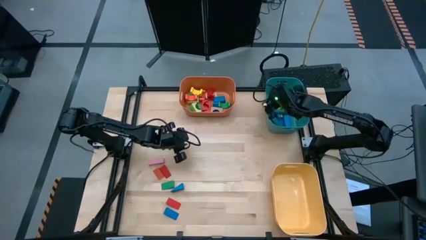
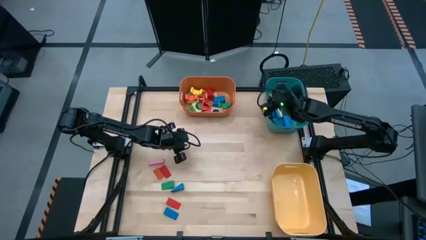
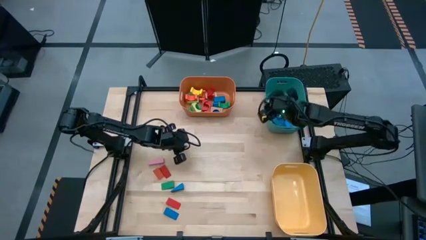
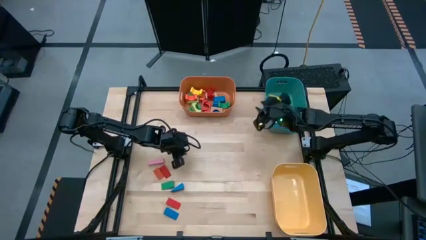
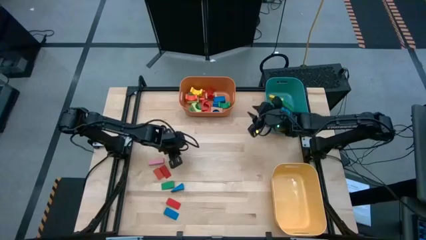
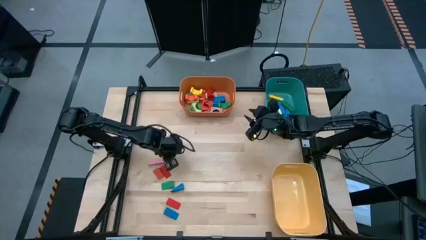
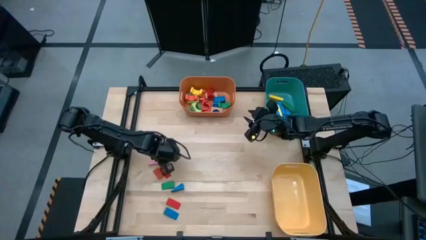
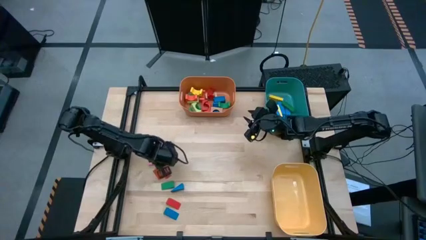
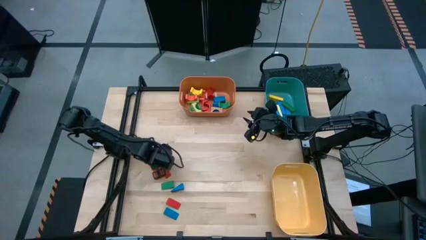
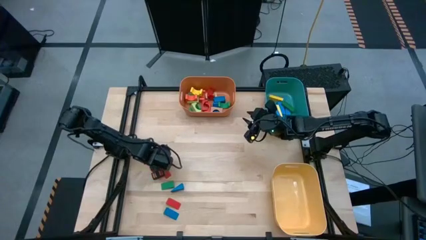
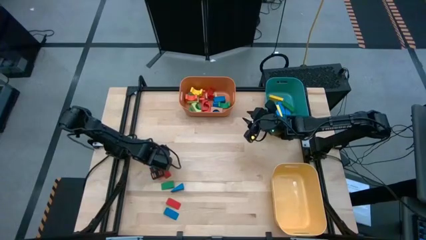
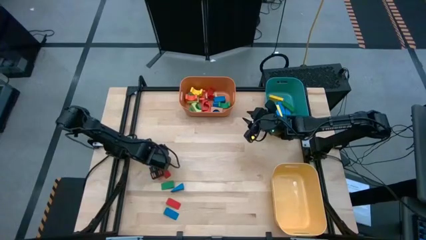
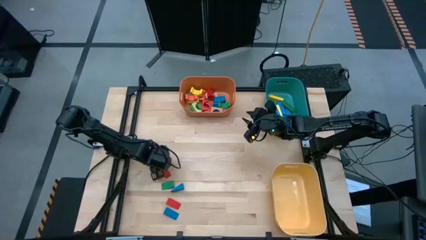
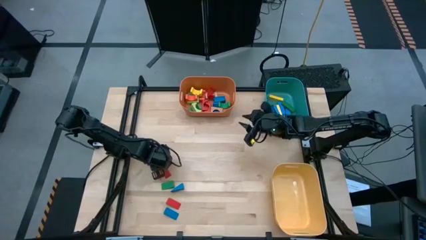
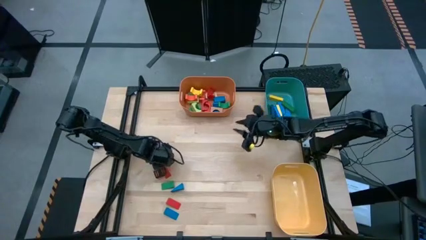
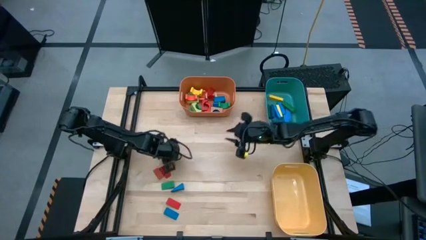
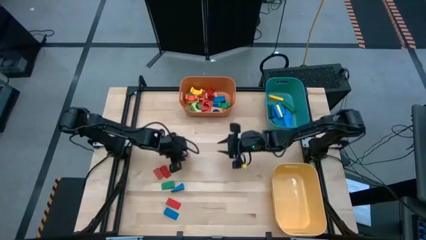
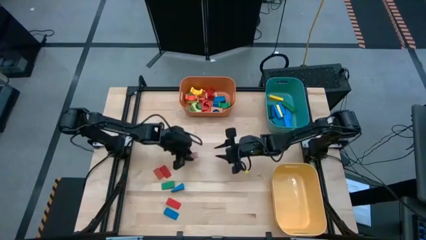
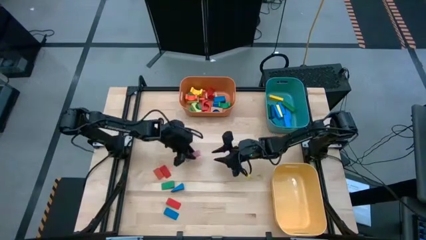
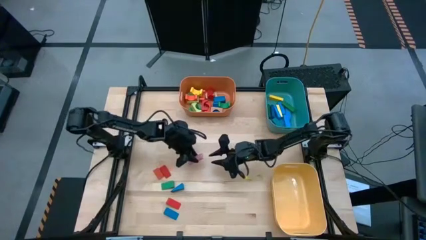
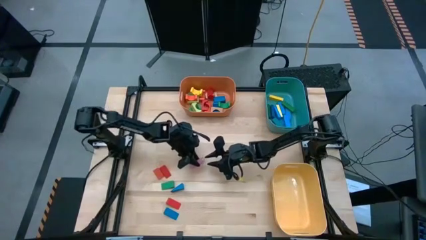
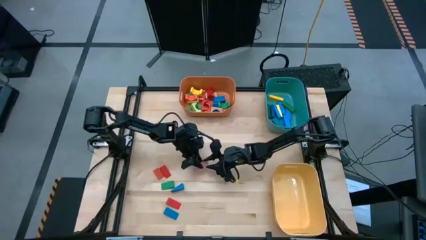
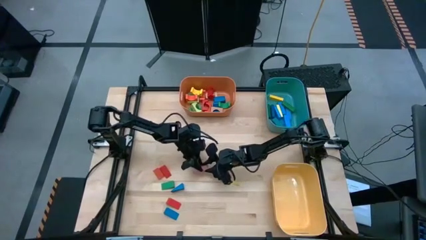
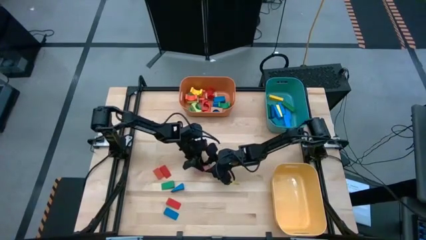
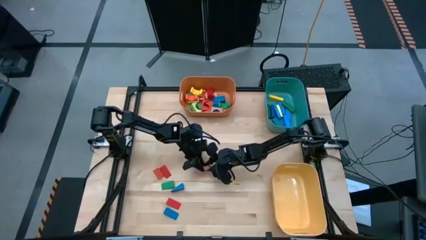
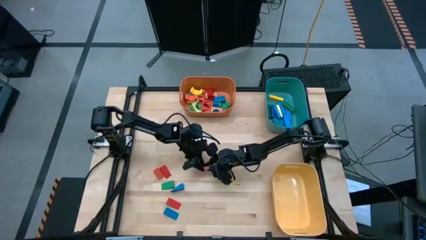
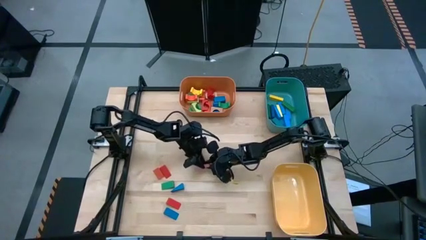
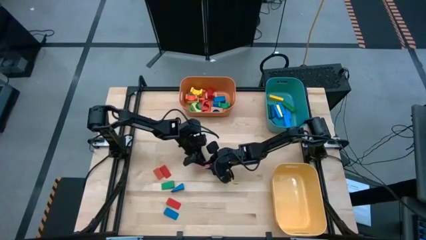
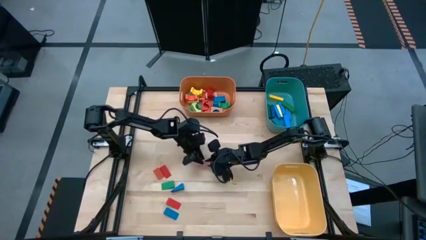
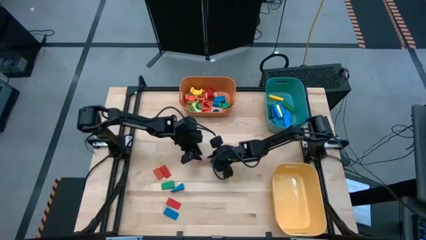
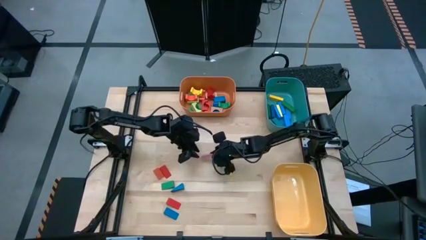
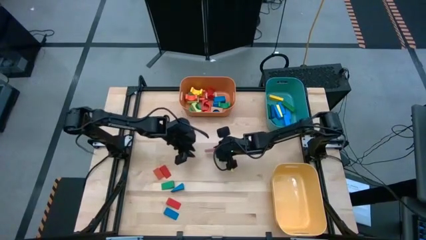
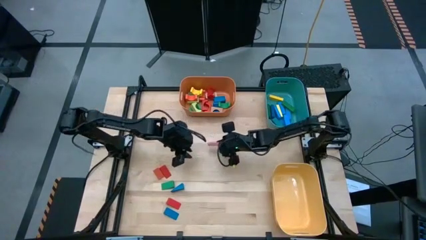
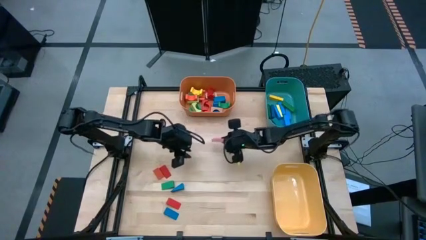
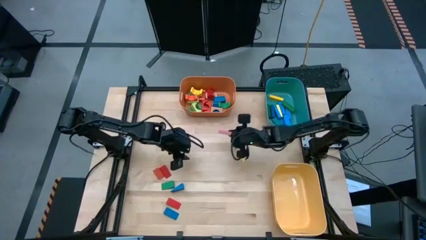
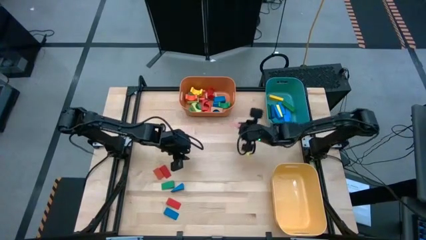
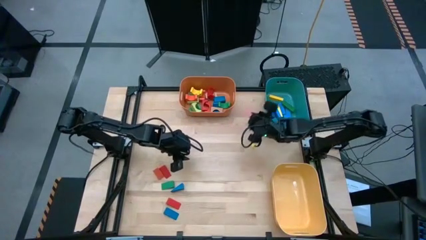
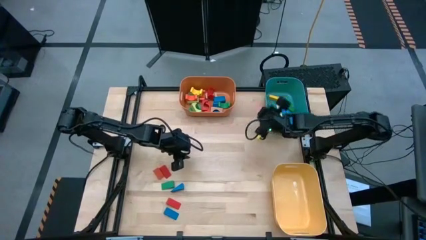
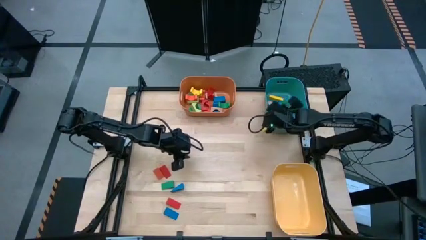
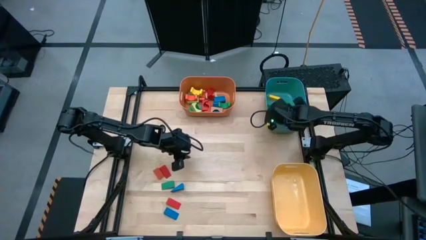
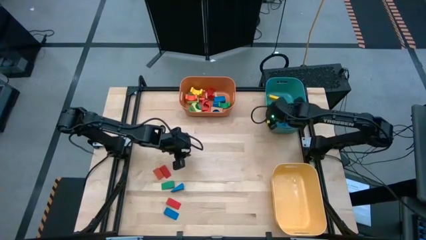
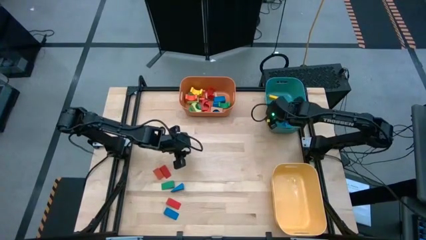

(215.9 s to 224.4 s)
Task: Sort blocks by size
Put the pink rectangular block into the green bin

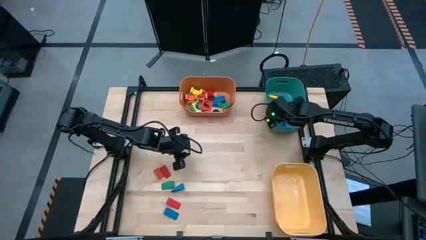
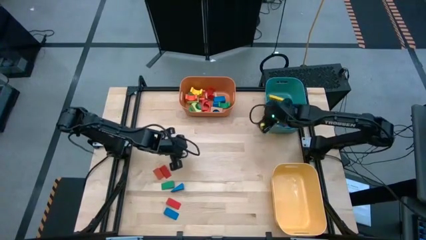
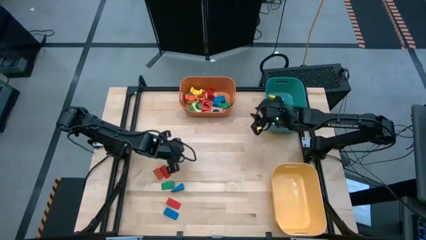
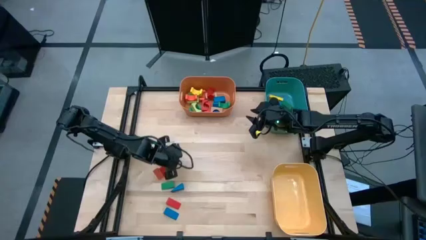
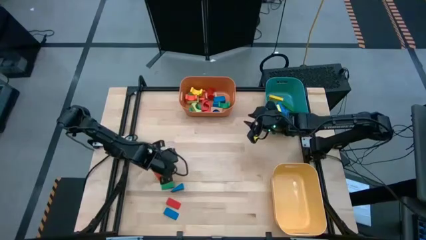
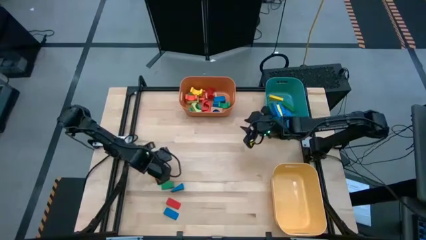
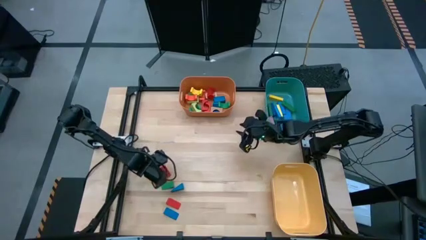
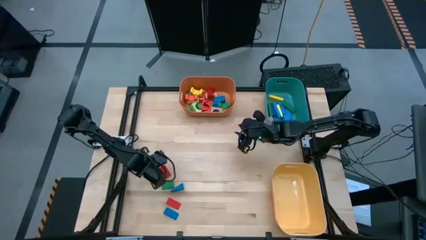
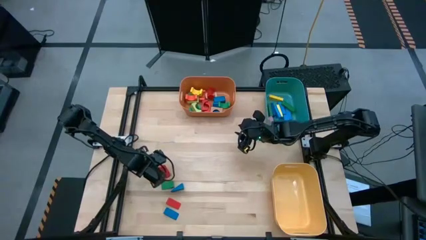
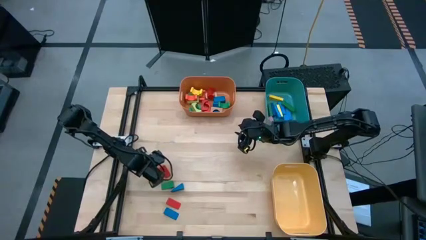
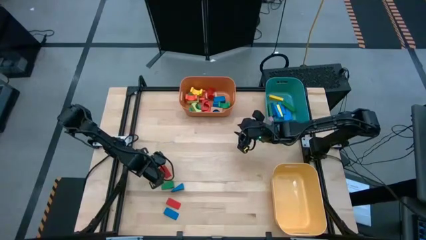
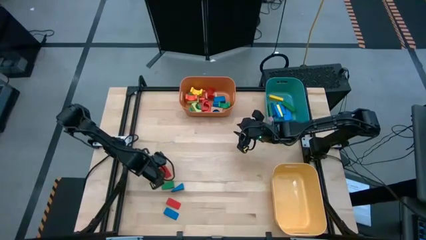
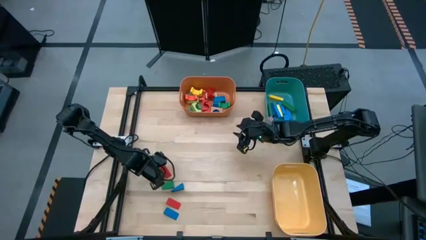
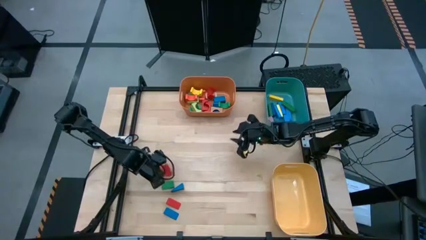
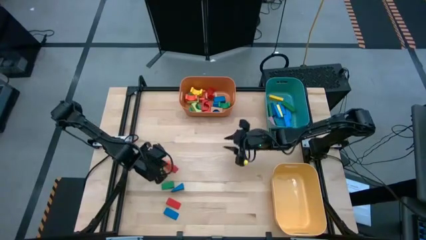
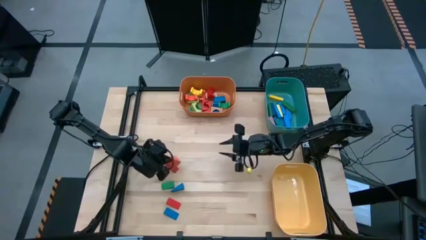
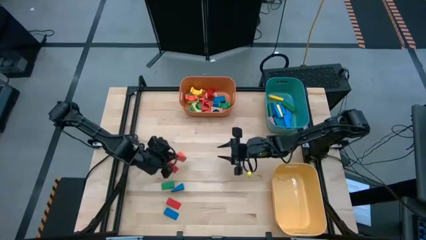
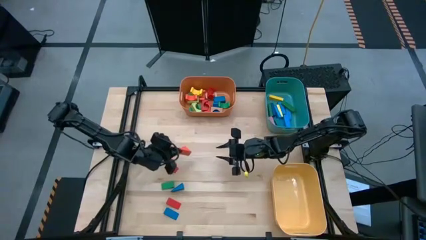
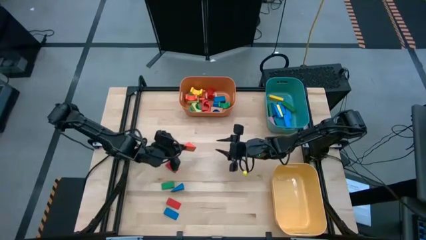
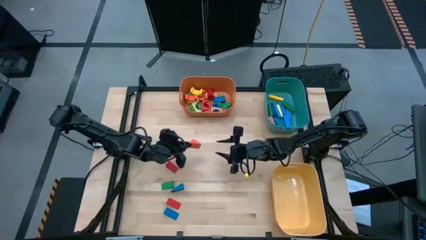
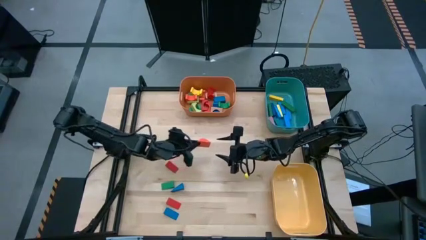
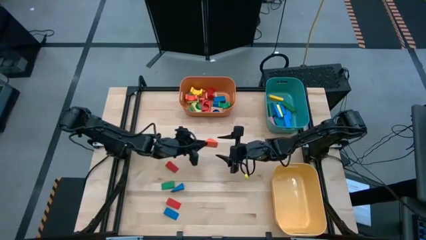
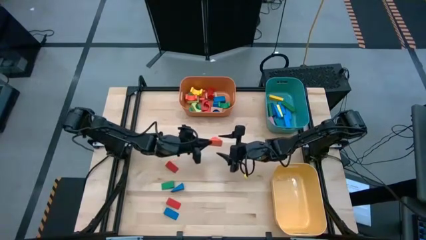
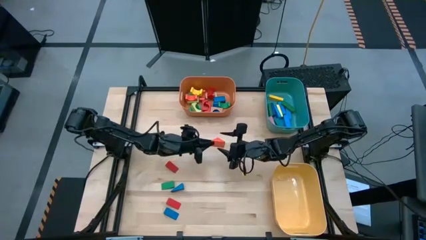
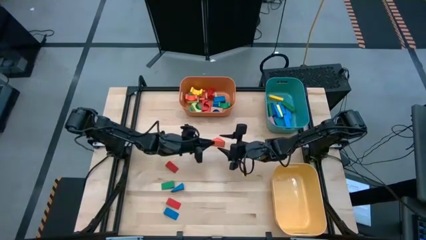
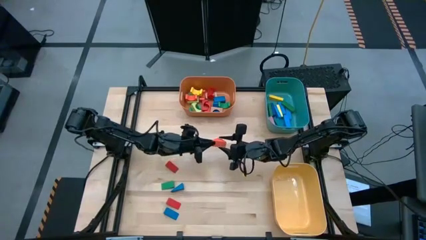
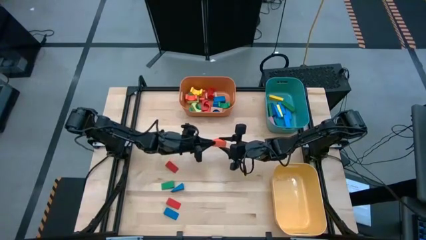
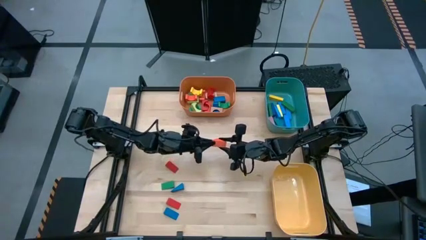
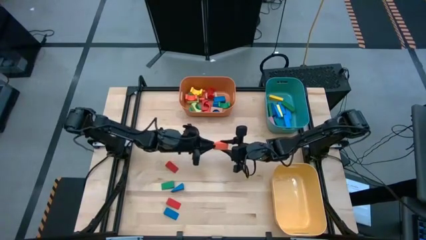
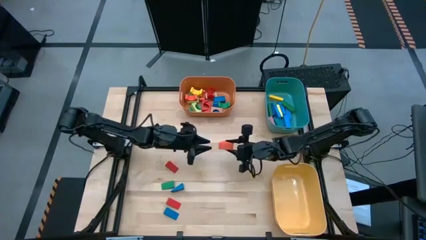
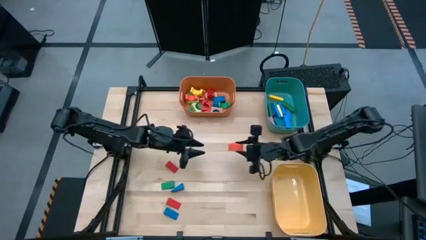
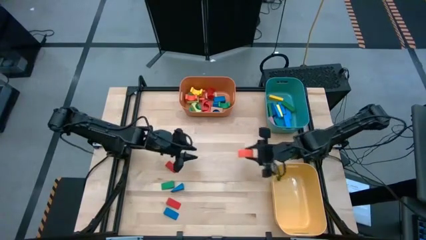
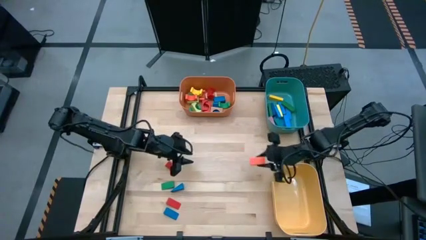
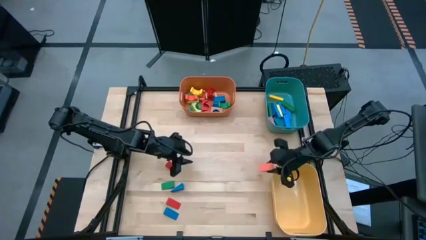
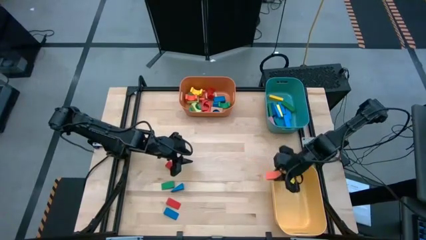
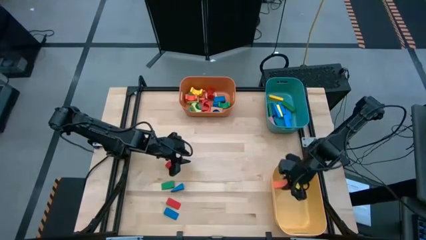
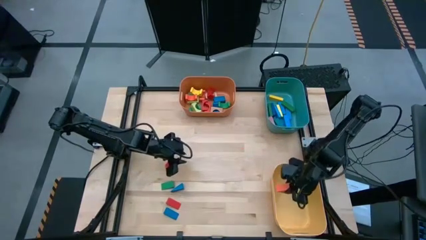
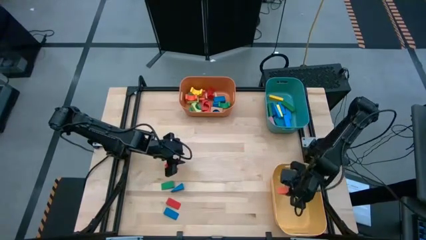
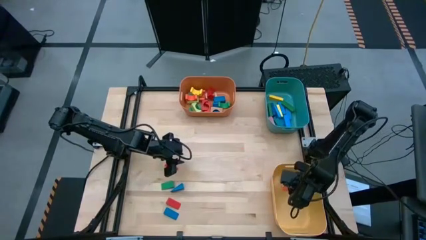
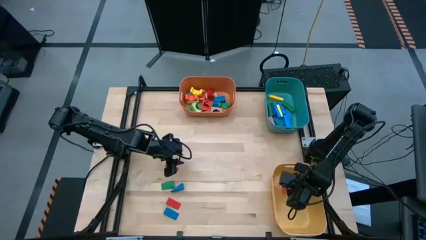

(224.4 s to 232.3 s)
Put the orange triangular block into the yellow bin
